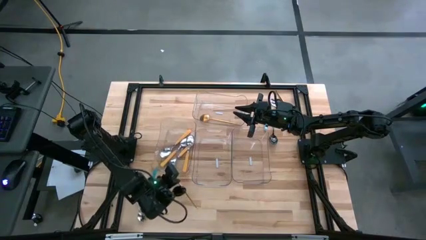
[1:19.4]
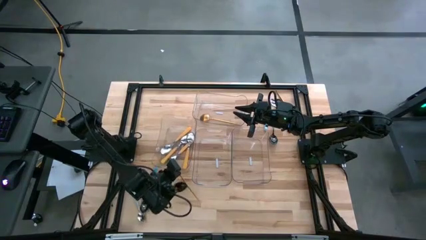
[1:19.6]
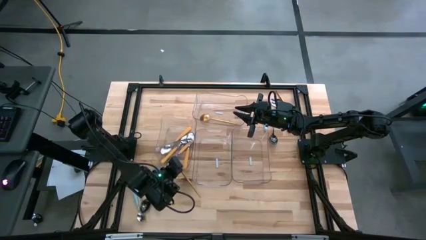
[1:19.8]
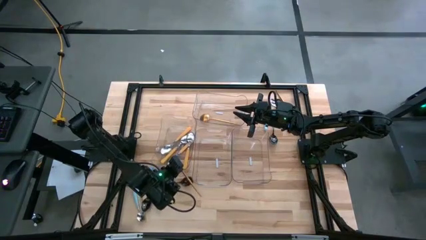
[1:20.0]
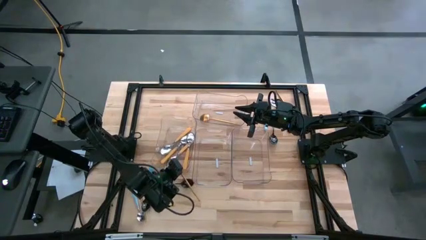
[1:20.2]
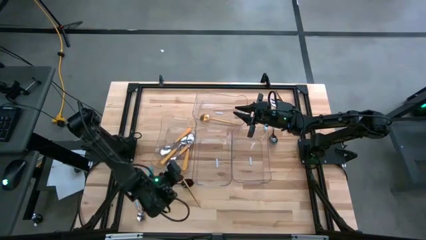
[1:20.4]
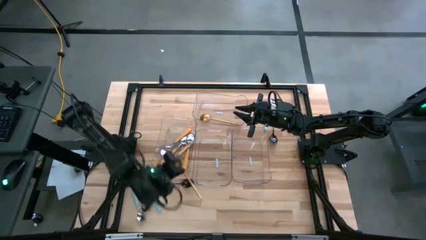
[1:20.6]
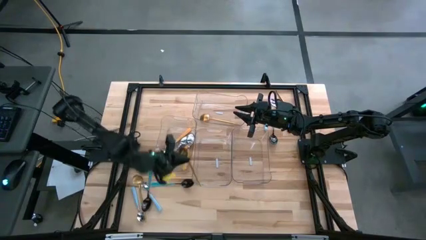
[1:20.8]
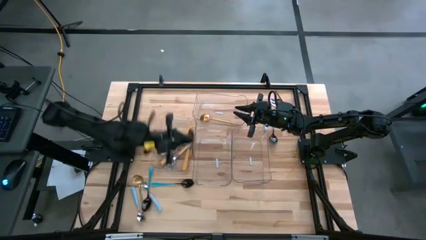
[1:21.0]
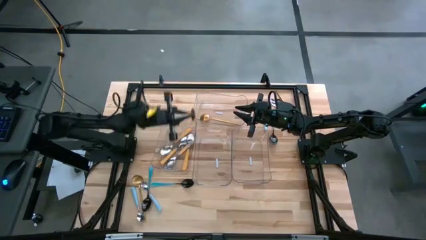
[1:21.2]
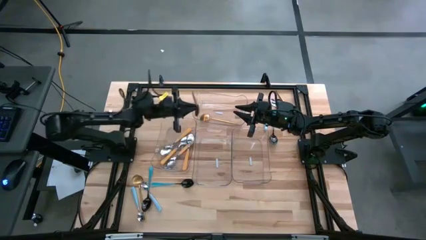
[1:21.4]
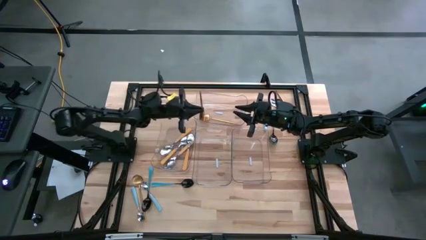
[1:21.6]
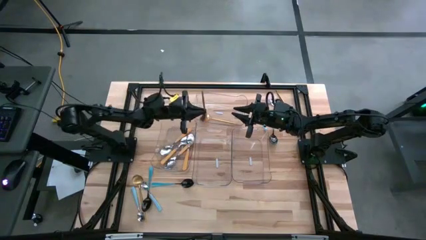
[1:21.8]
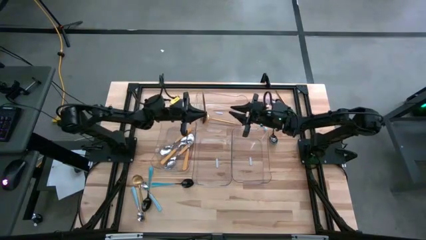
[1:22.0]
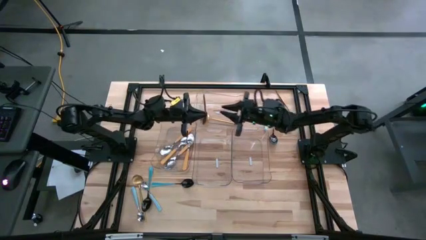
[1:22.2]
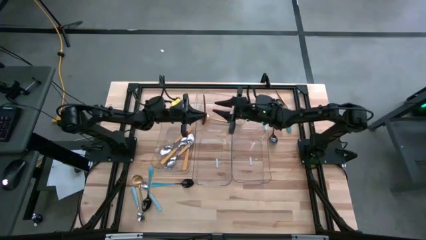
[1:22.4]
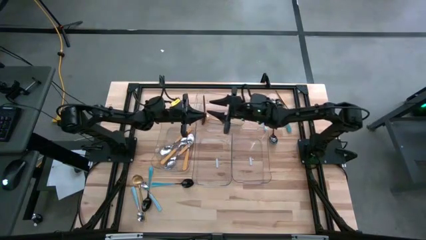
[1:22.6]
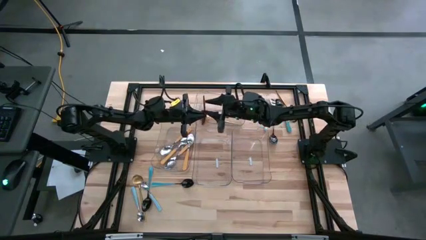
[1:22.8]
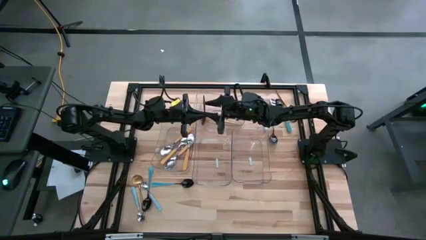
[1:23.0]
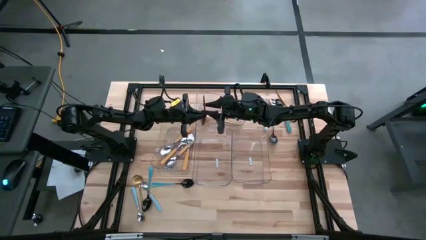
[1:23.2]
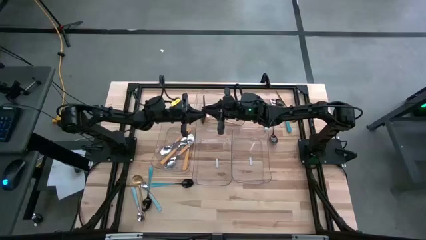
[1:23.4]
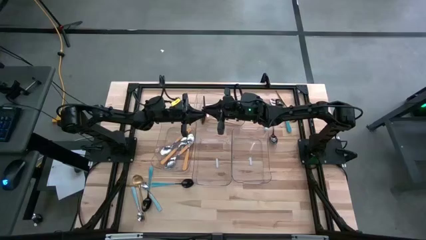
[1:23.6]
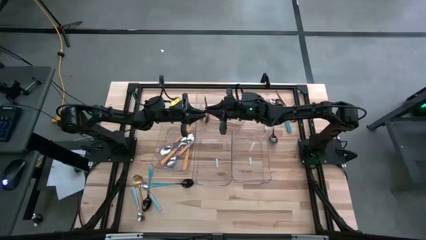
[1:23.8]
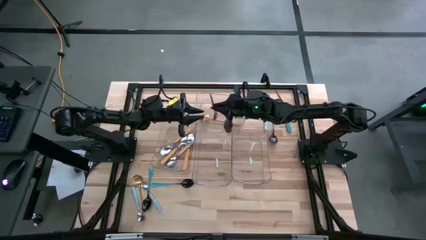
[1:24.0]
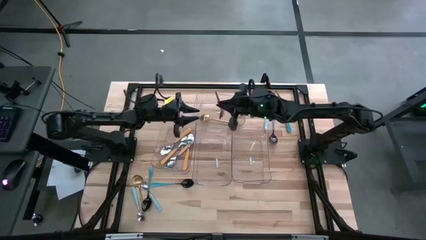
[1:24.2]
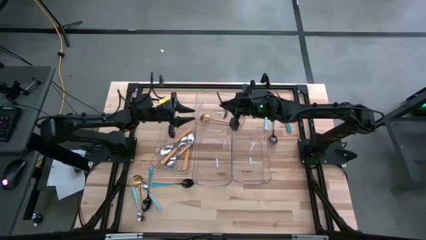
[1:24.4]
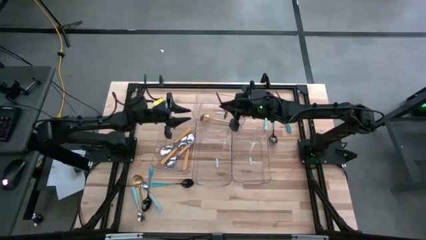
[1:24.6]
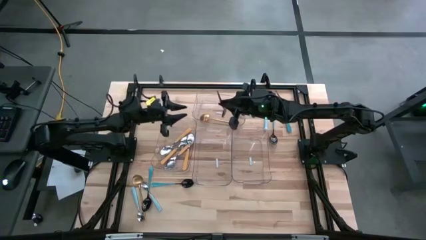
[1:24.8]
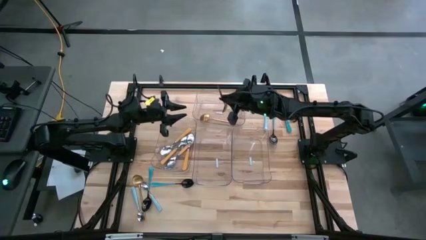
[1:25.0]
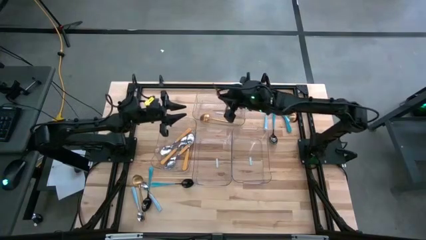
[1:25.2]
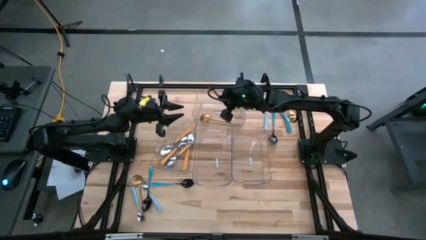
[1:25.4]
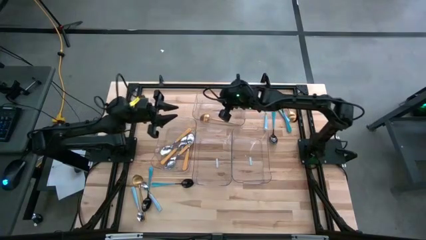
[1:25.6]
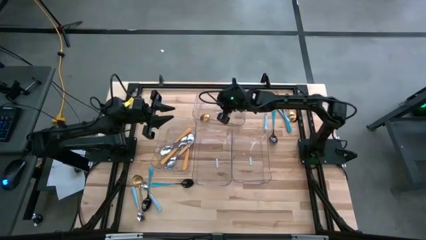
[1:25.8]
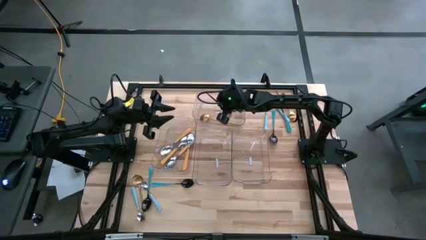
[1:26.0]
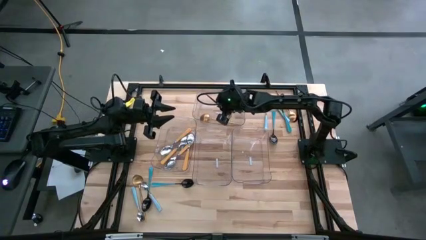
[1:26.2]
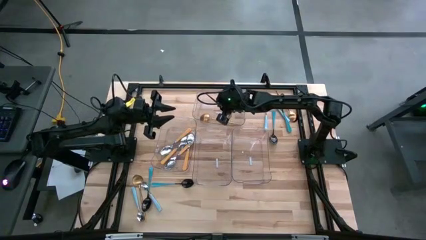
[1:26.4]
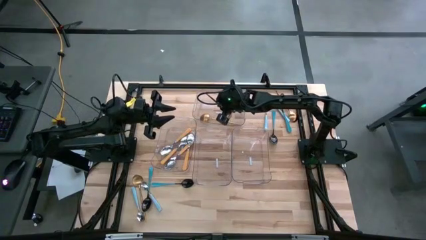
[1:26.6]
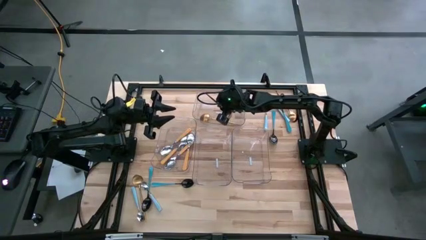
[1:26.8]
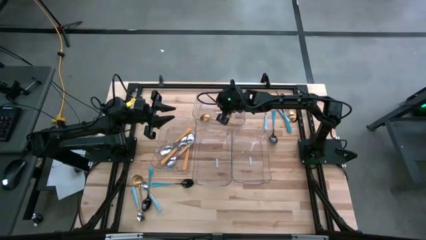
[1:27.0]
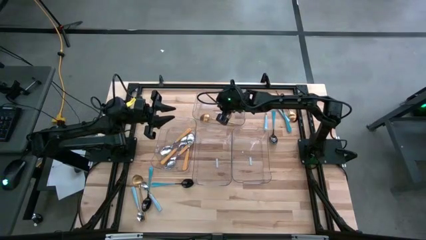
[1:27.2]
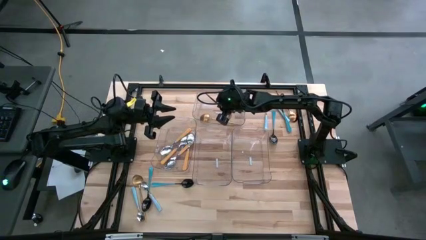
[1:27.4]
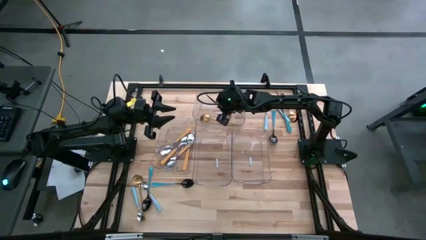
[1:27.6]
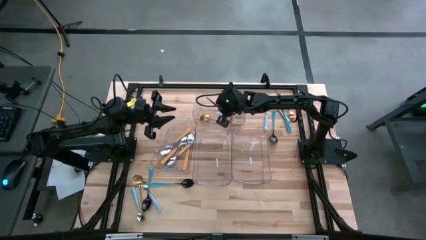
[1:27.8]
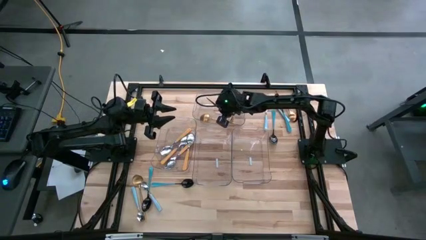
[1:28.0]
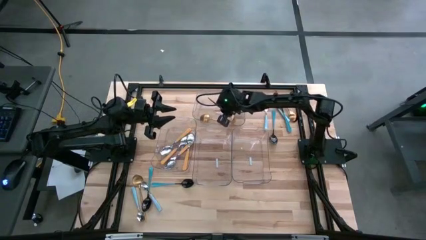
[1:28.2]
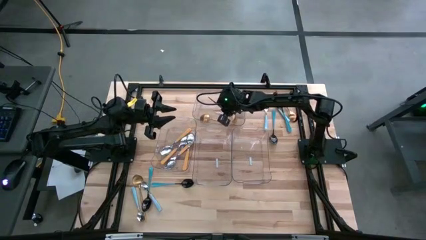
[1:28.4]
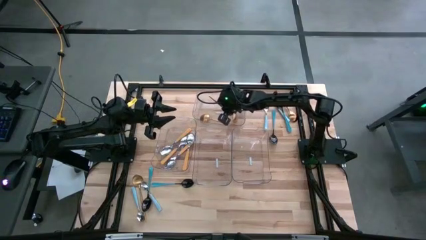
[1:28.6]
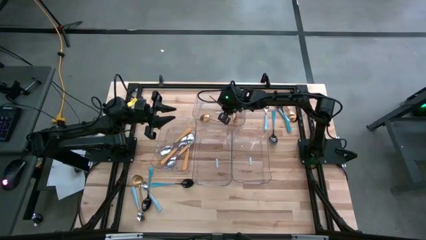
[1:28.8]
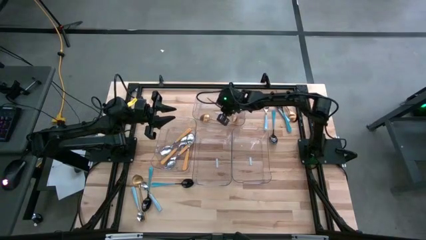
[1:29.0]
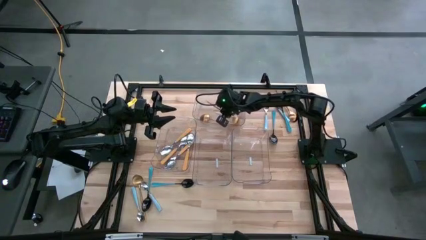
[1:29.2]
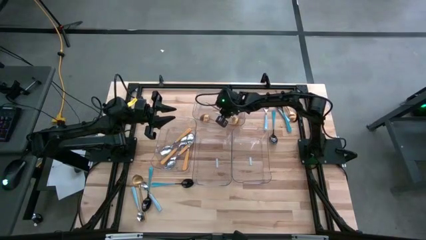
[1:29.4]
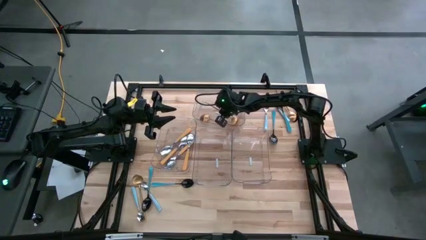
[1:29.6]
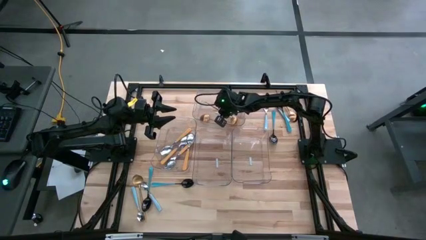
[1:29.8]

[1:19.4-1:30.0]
Task: Sort silverware by color (type)
Put the gold spoon into the top transparent bin

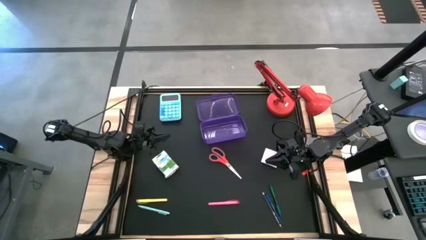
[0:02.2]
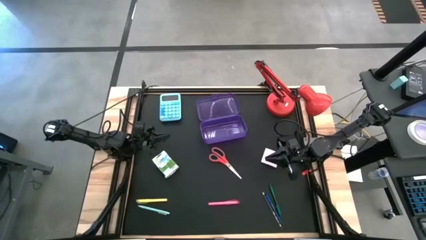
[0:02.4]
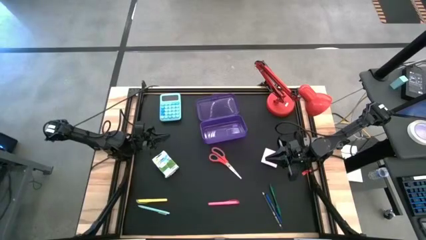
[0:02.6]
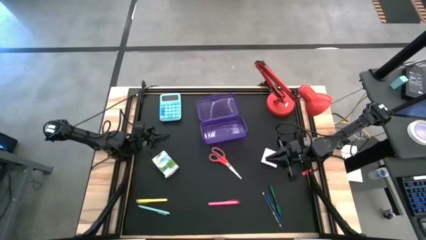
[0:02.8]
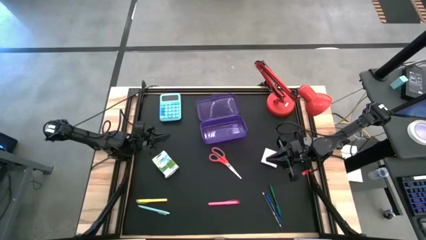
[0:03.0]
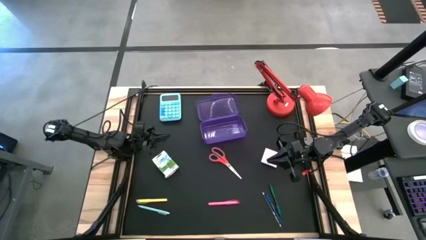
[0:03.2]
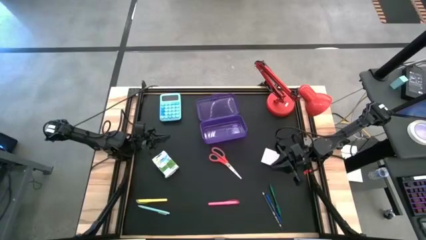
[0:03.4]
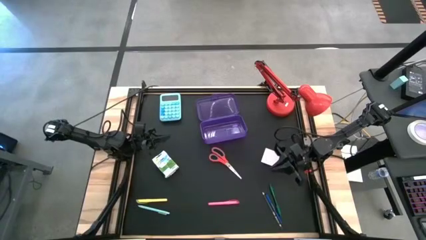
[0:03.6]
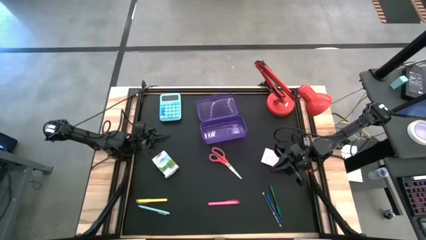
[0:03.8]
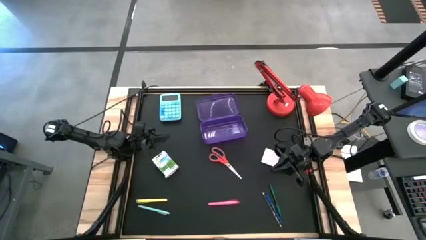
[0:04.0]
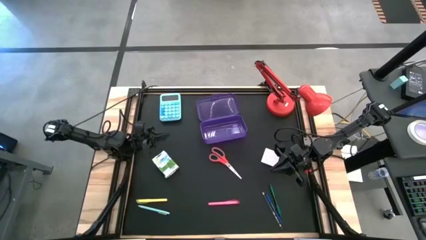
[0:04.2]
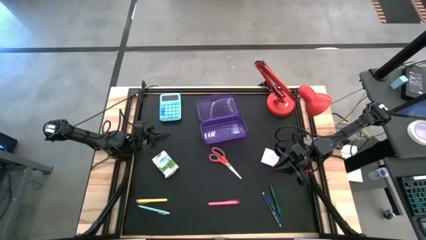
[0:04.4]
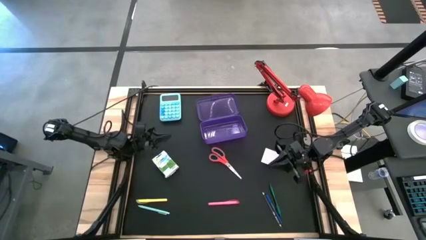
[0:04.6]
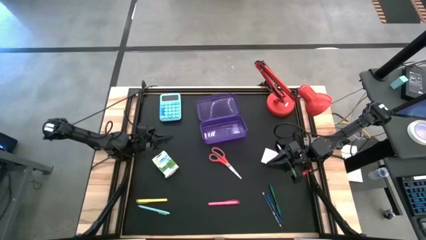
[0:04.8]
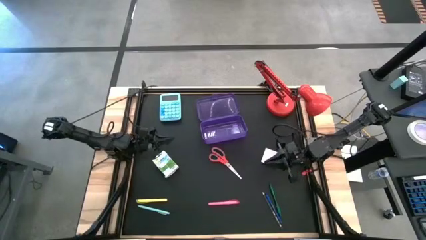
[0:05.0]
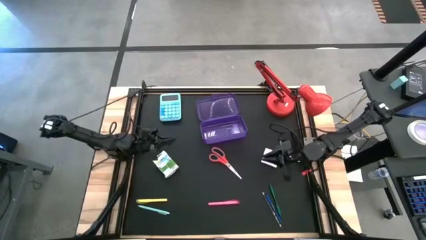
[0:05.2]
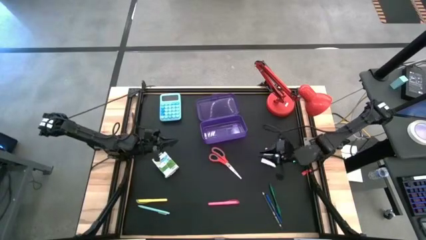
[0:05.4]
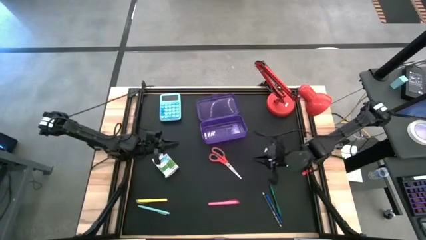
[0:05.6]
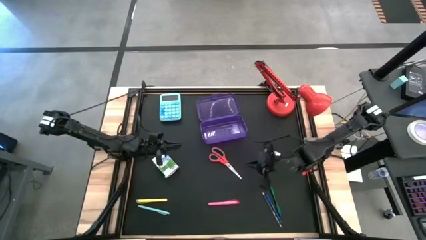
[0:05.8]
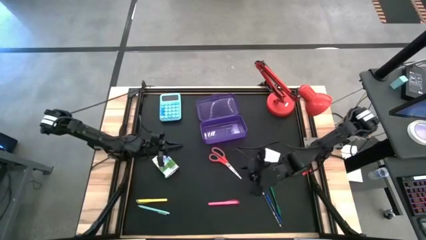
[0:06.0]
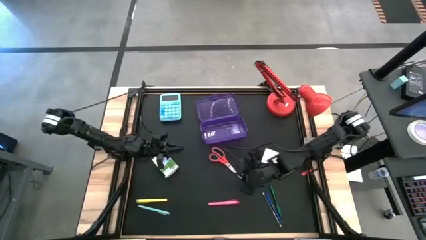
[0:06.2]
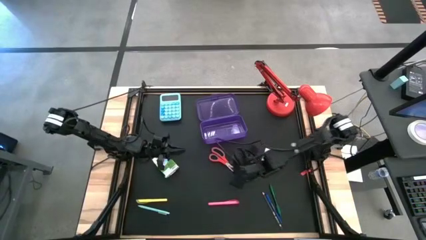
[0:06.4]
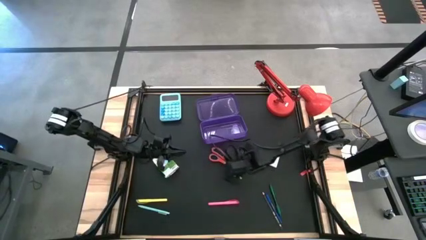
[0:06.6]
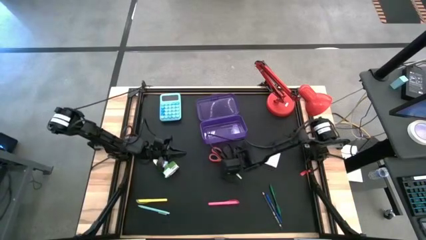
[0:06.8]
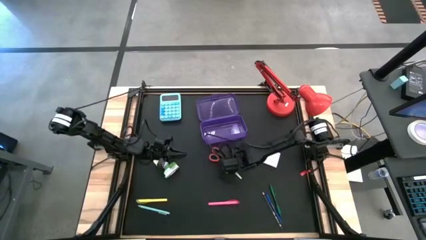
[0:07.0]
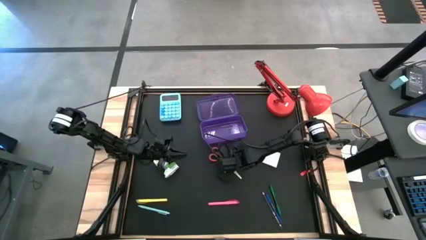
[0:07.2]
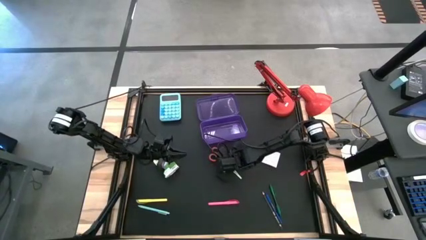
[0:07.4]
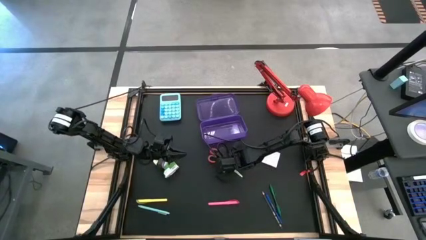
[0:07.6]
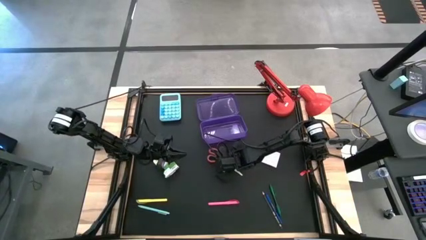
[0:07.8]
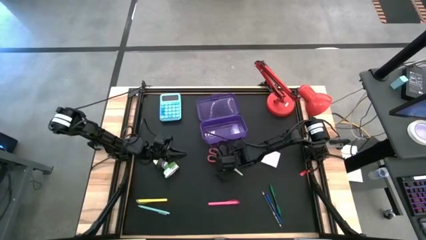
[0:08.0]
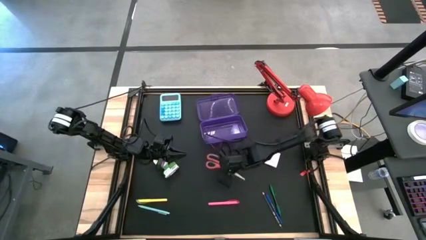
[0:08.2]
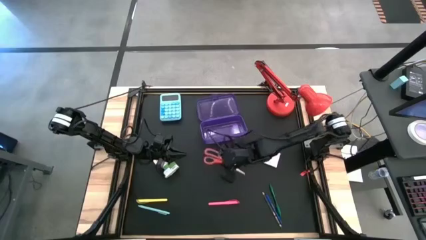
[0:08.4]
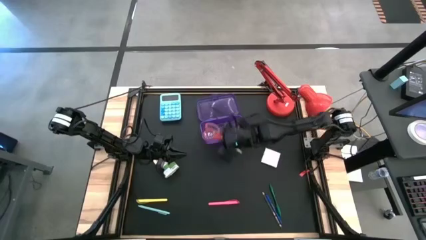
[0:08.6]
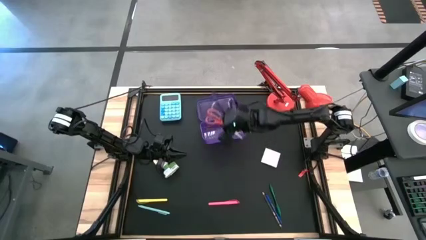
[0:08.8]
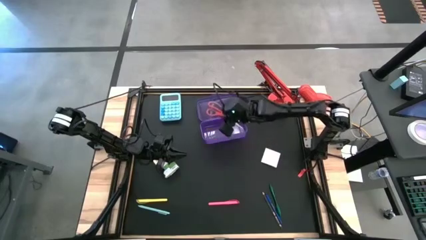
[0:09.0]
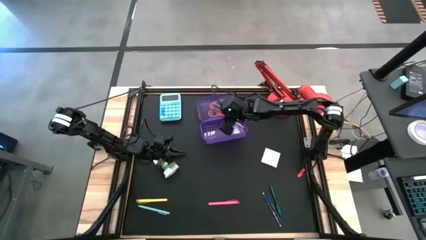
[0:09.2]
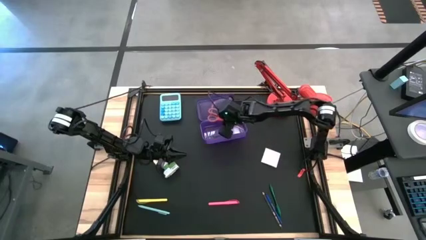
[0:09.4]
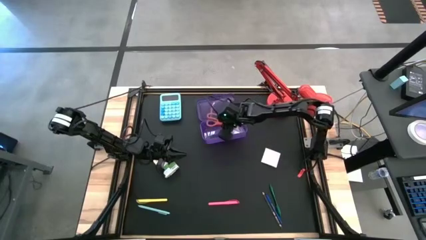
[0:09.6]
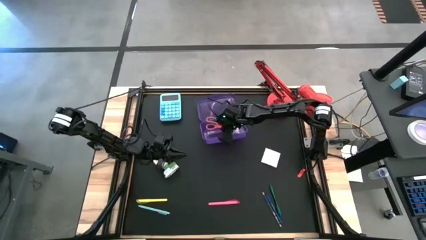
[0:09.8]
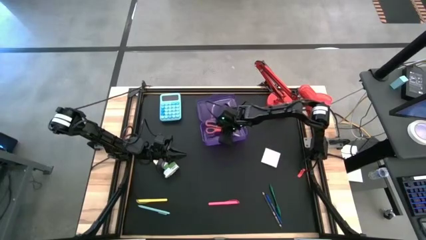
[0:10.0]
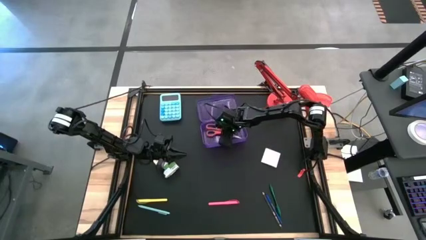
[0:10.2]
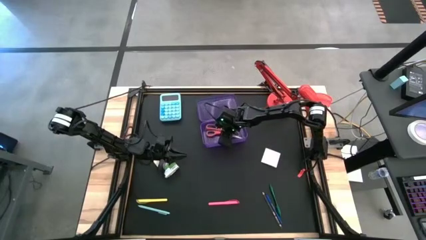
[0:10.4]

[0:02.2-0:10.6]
Task: Pack school essentials
Put the red scissors into the violet supply box
